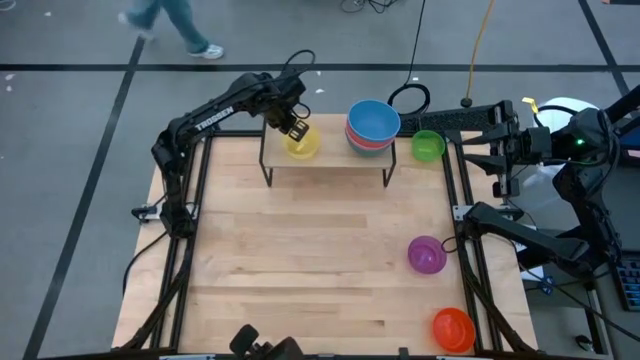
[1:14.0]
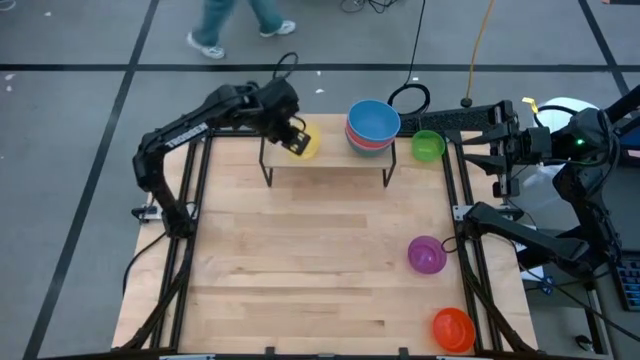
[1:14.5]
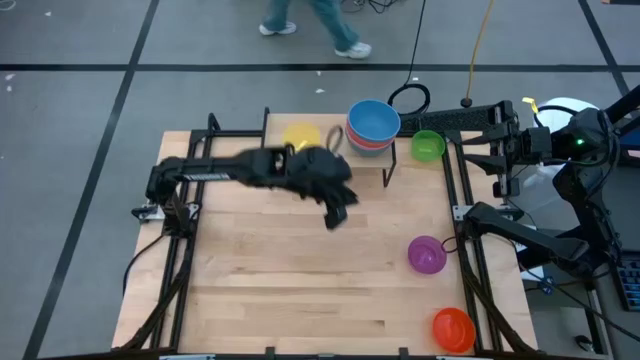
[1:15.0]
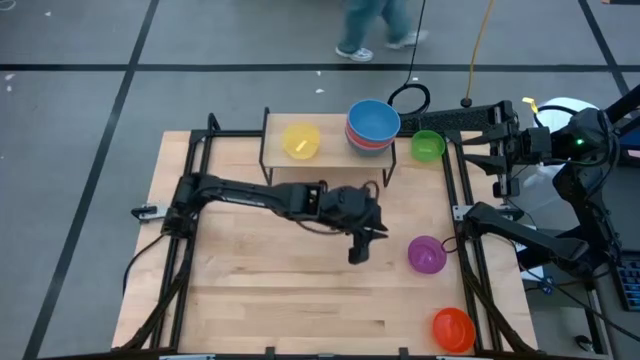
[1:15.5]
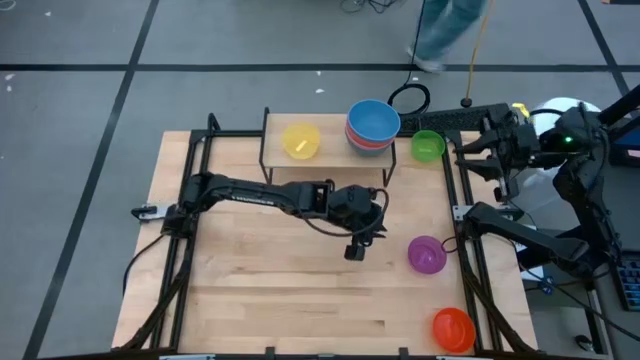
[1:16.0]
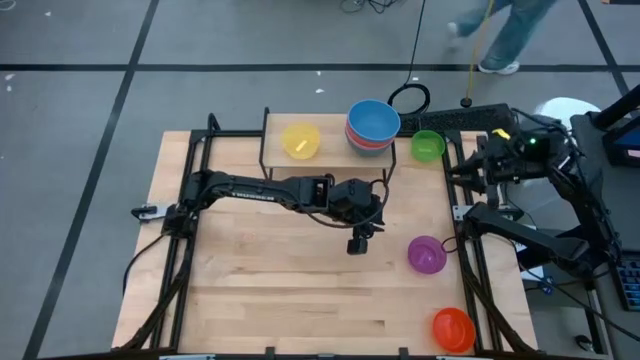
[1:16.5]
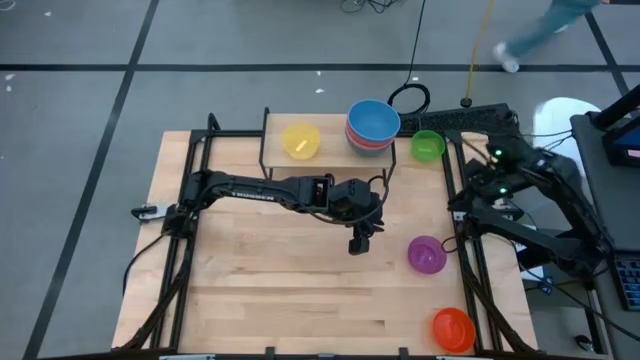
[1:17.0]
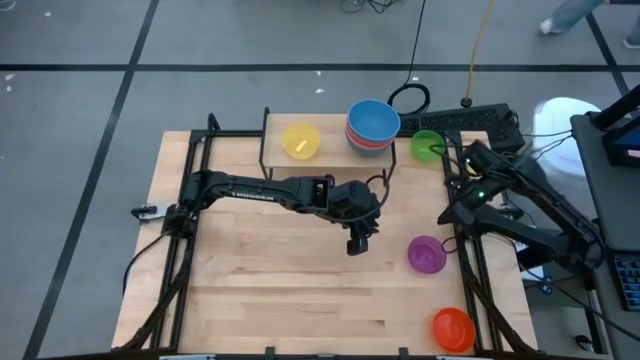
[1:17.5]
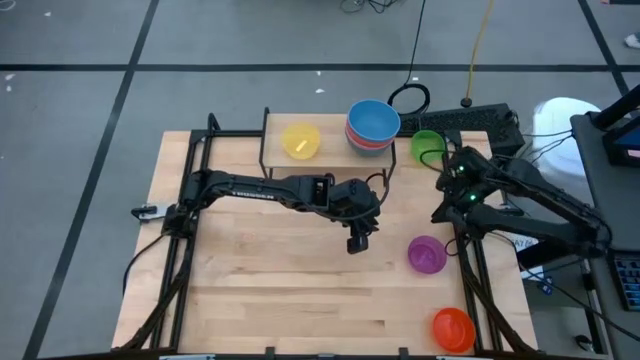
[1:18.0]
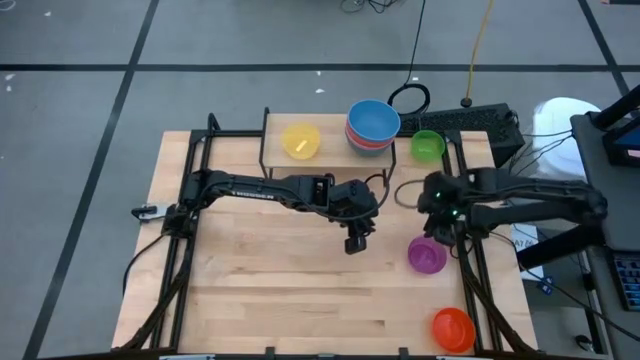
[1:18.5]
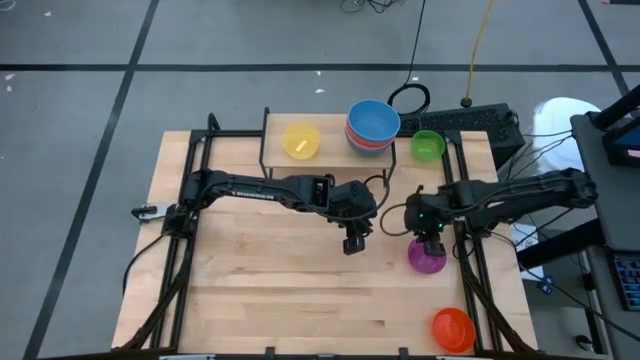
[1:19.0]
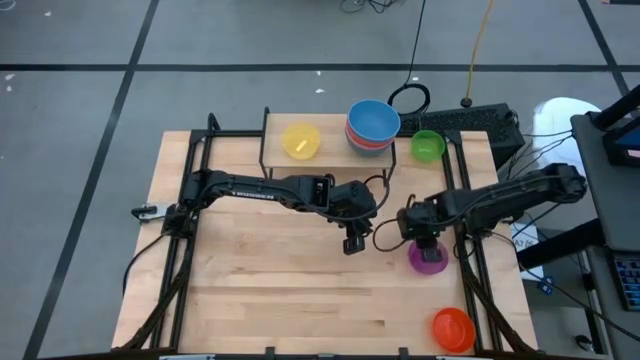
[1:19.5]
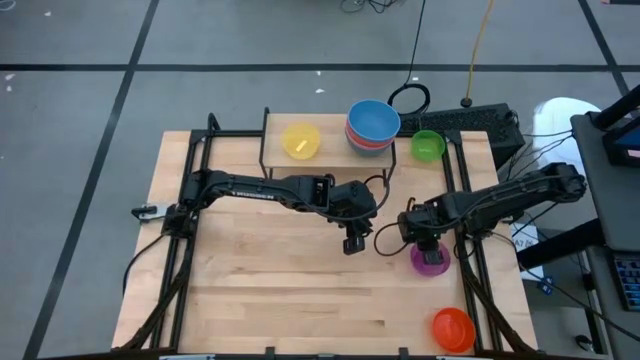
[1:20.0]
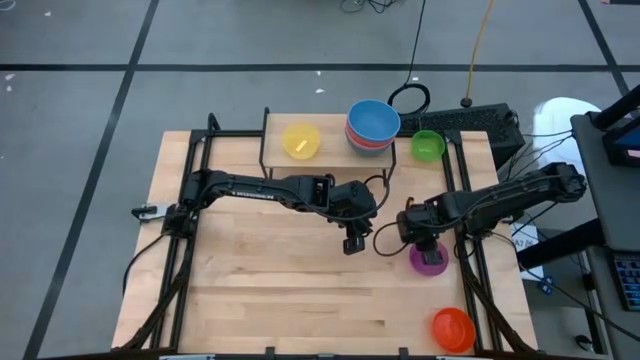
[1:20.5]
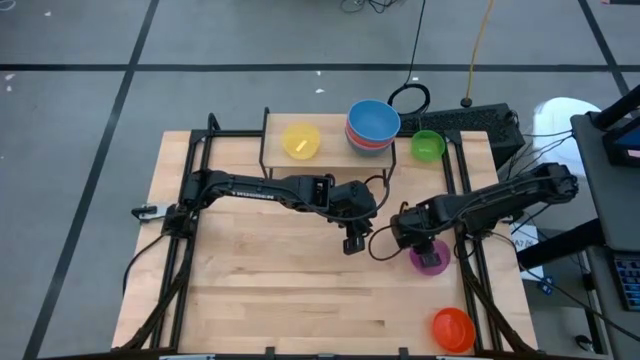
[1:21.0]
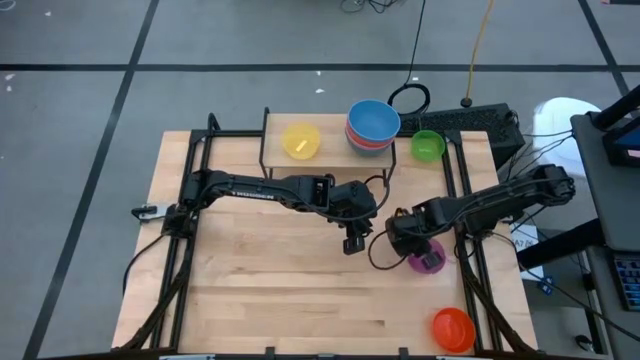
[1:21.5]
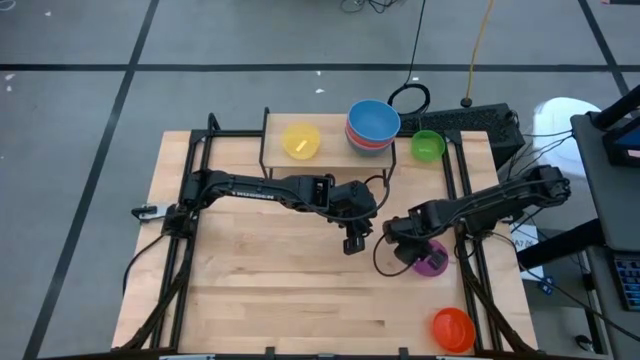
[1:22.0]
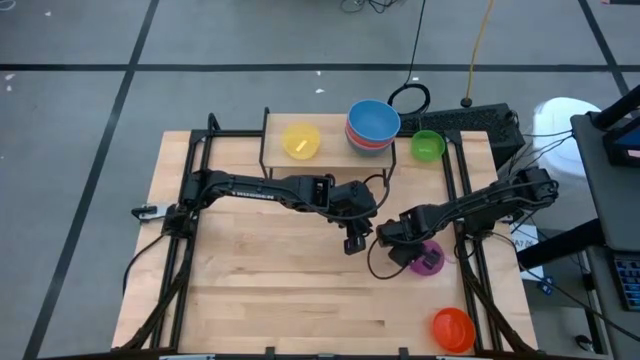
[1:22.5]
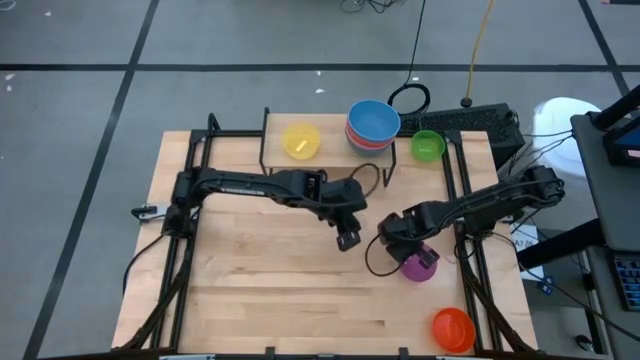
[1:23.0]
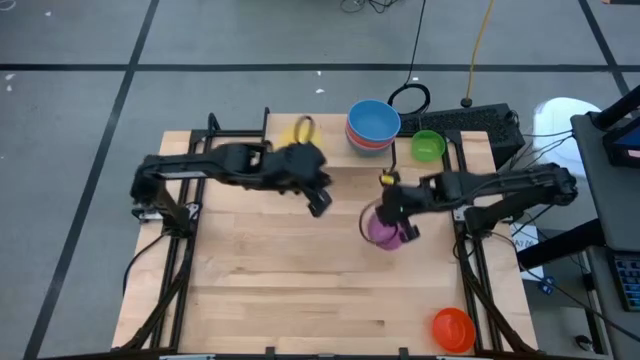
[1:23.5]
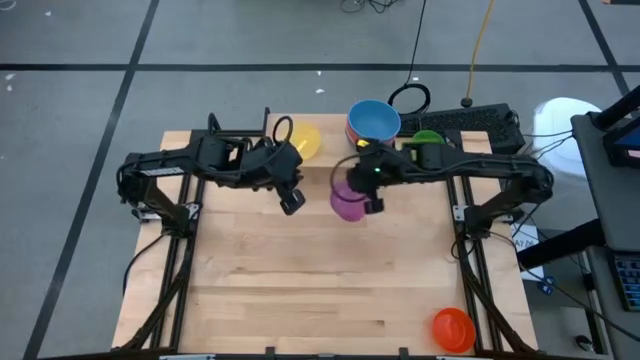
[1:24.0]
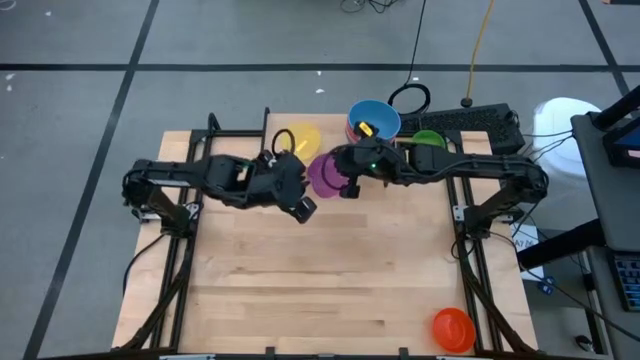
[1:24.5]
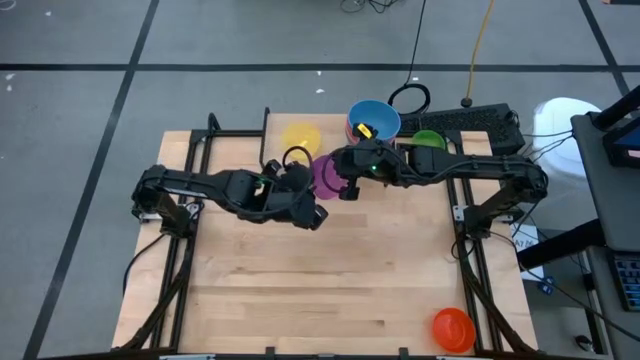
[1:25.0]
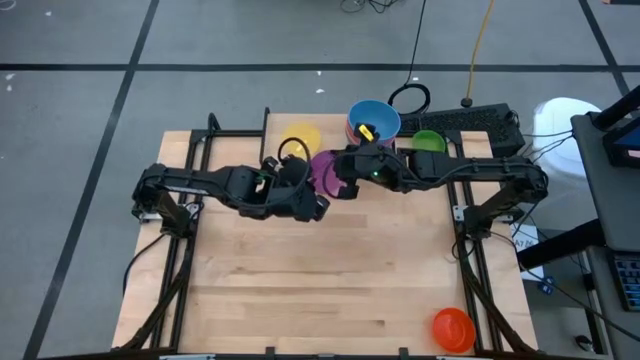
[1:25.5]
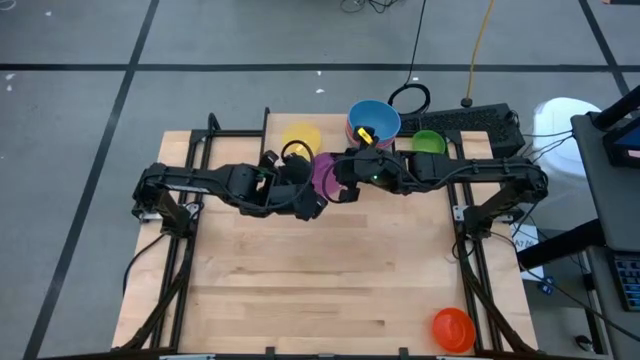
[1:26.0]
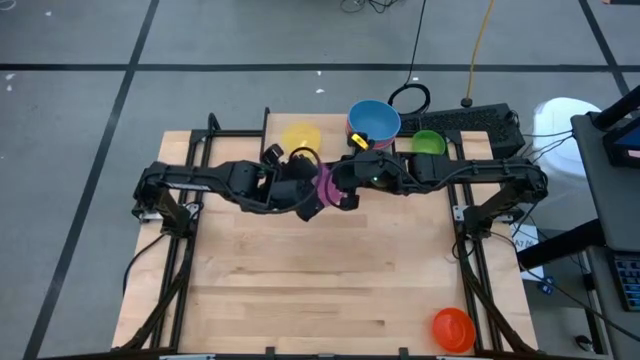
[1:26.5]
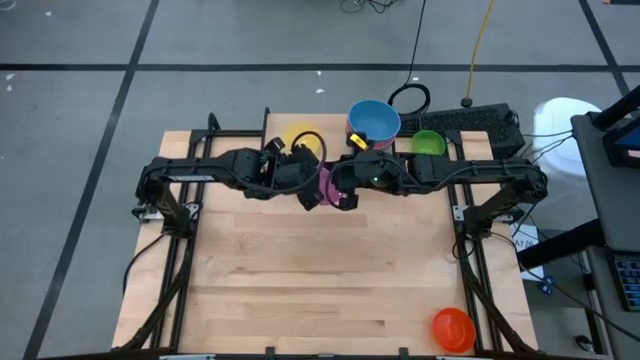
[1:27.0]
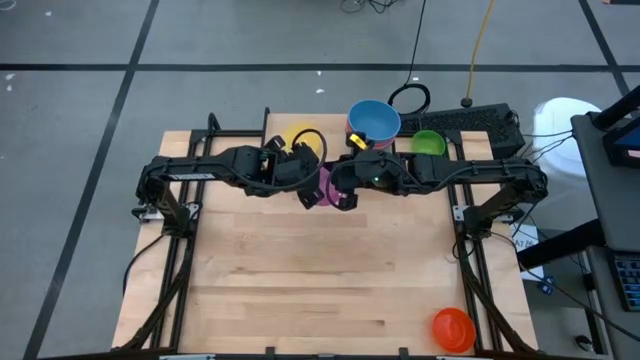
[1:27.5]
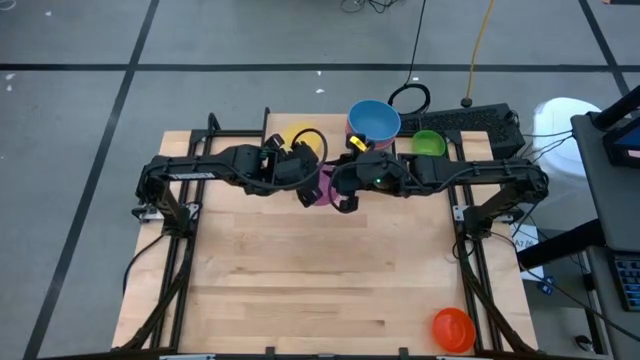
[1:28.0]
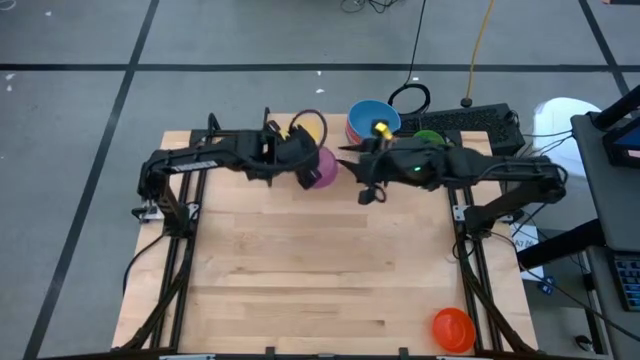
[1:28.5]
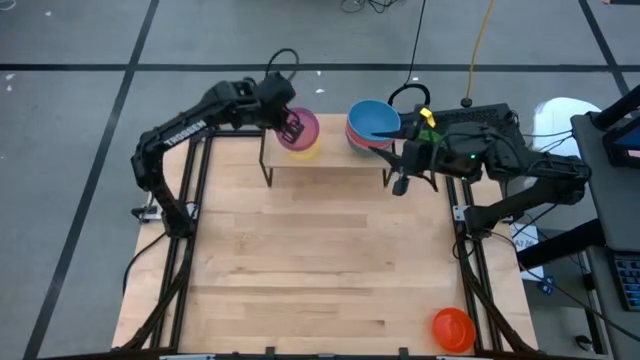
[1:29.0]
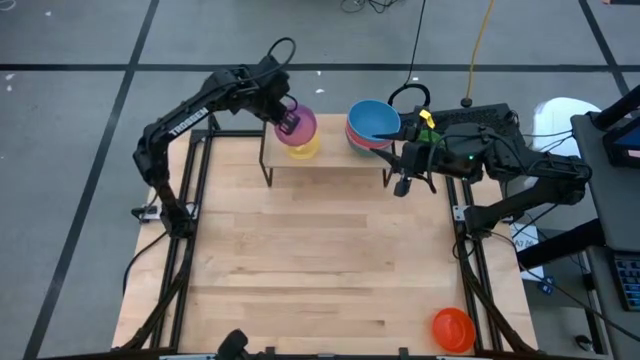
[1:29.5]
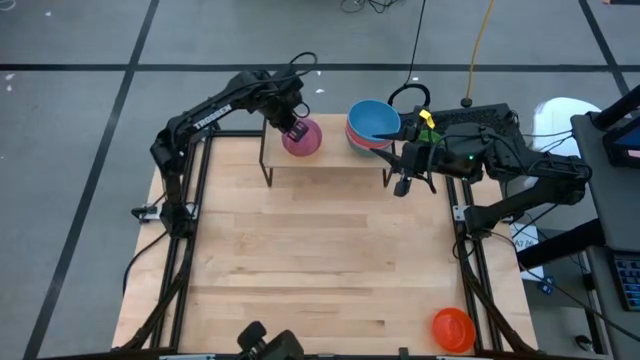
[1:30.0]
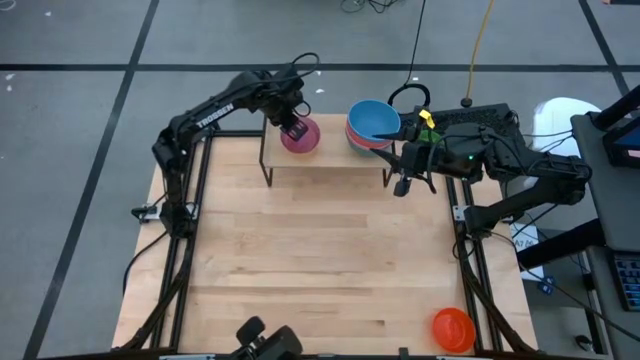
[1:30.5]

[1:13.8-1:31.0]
Task: Place and stack bowls onto a shelf
Stack the transparent violet bowl on top of the transparent yellow bowl on the shelf
